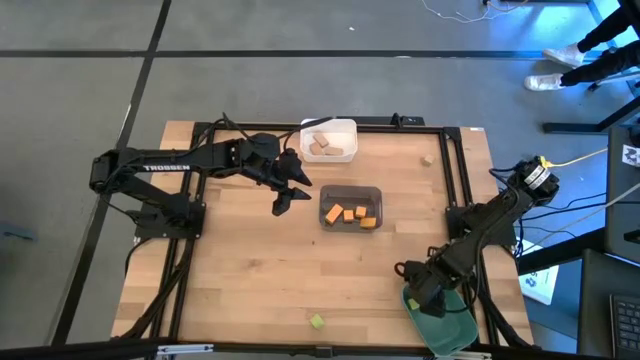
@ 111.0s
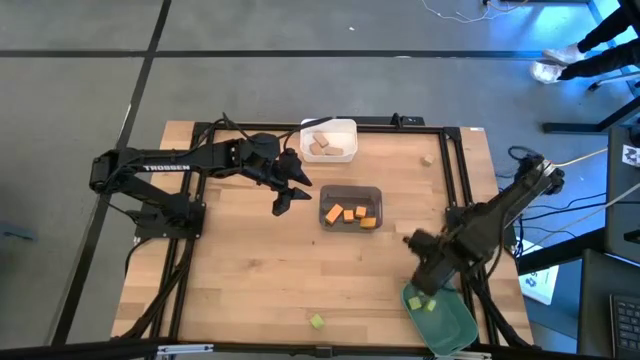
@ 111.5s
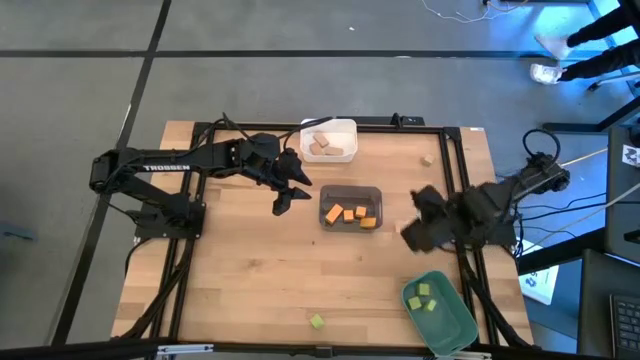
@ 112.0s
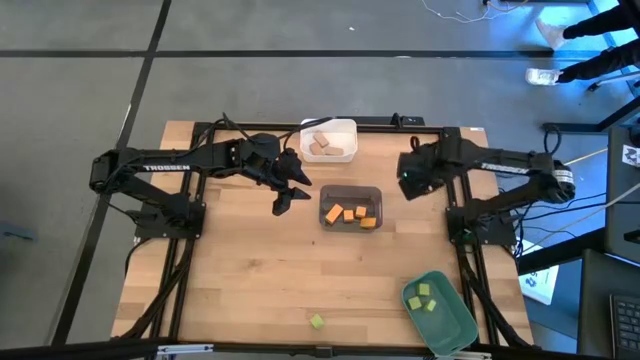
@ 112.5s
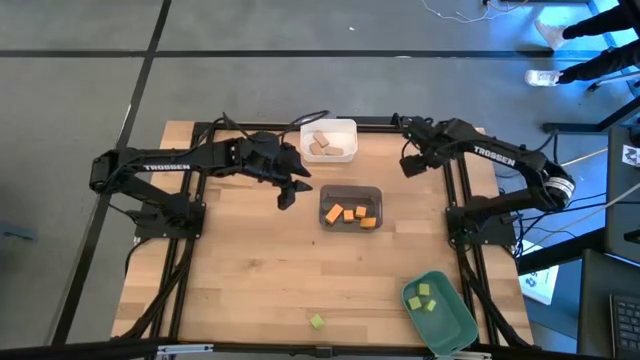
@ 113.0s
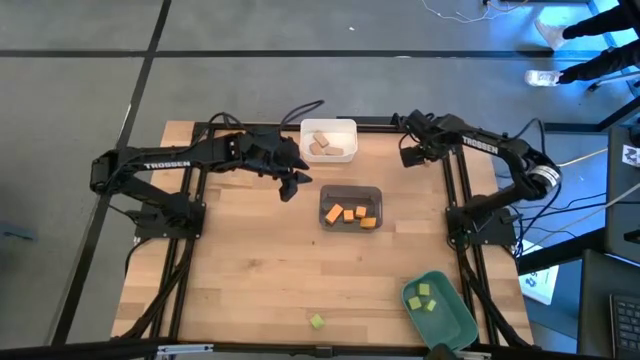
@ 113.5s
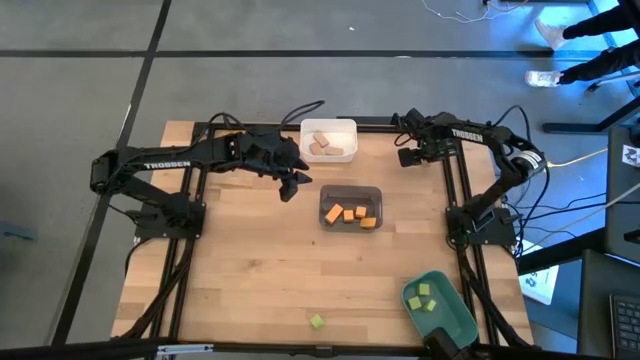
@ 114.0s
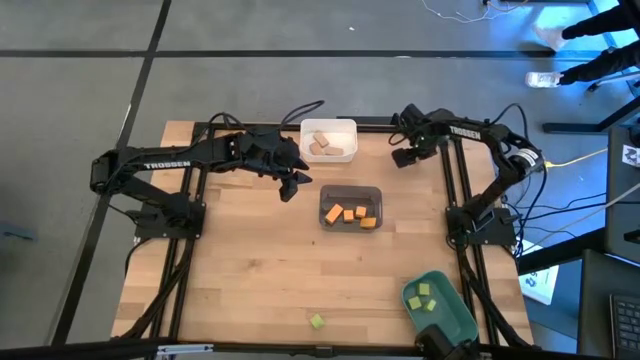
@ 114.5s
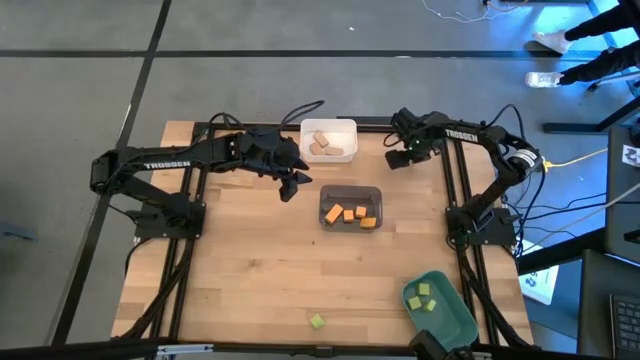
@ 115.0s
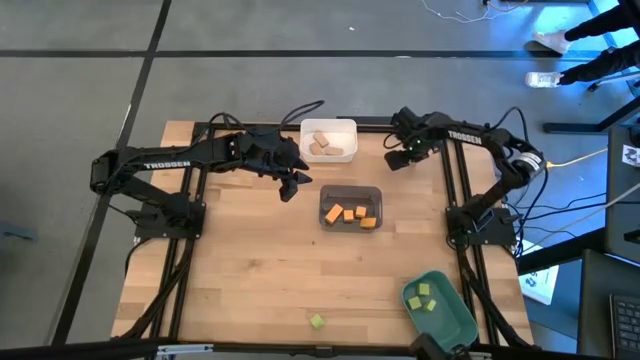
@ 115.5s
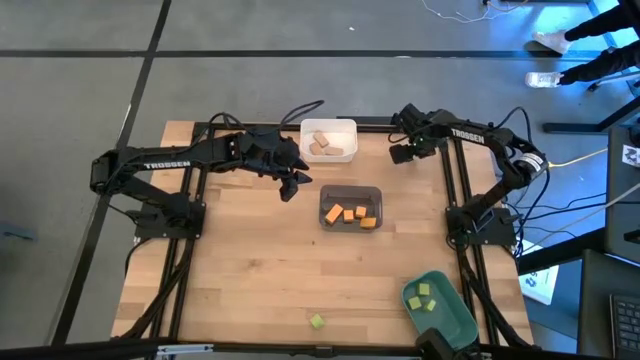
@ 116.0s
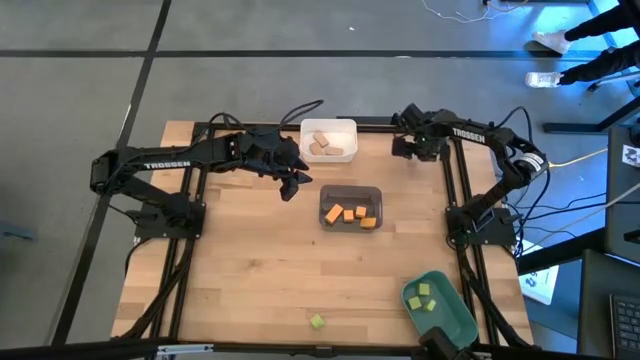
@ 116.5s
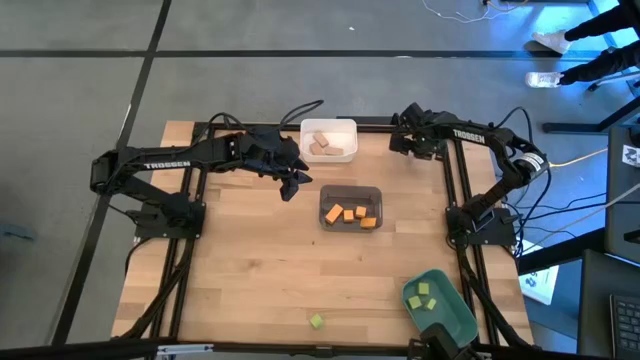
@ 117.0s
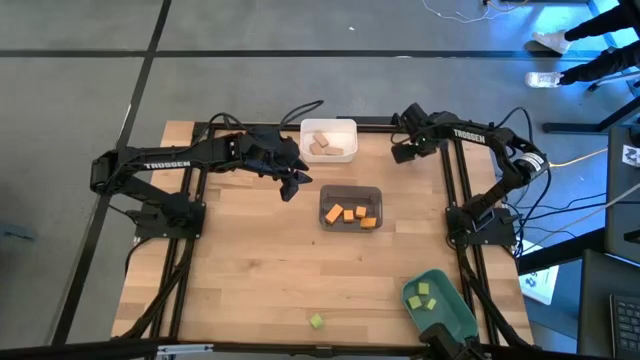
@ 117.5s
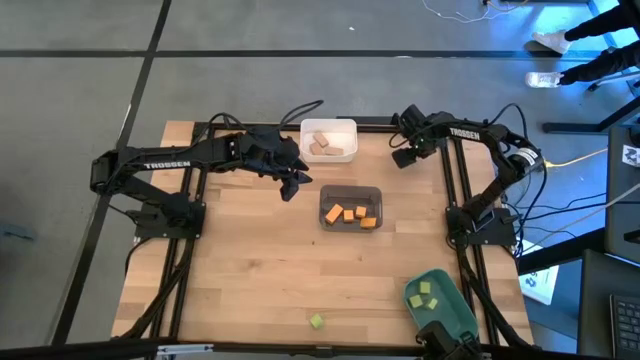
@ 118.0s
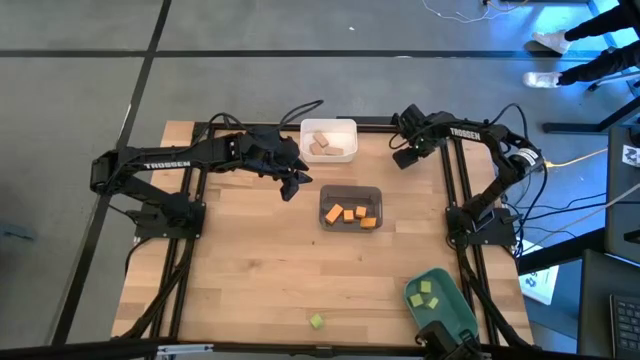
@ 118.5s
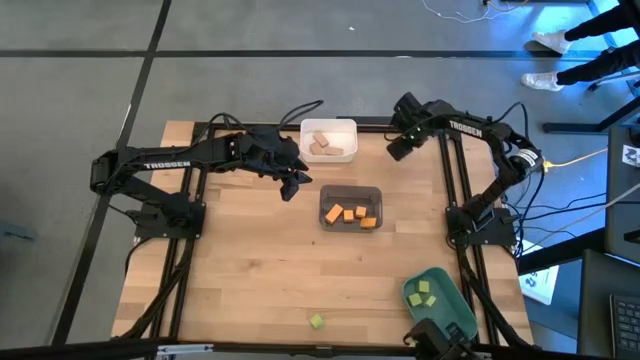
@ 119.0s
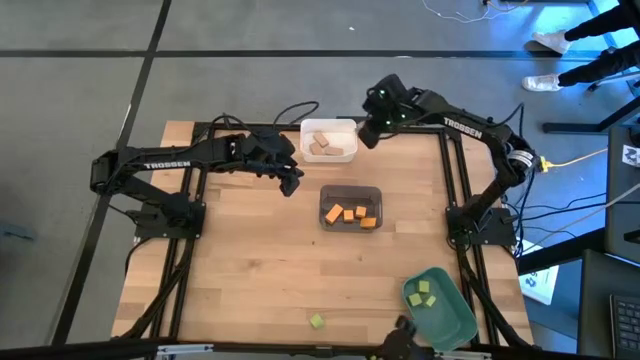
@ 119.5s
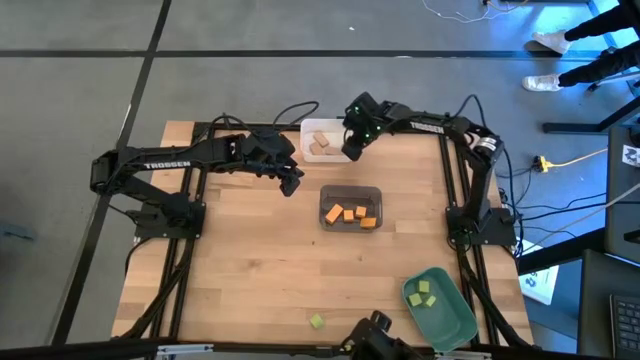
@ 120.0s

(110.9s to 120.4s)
Task: Sort & place blocks by color
Put the brown block into the white bin

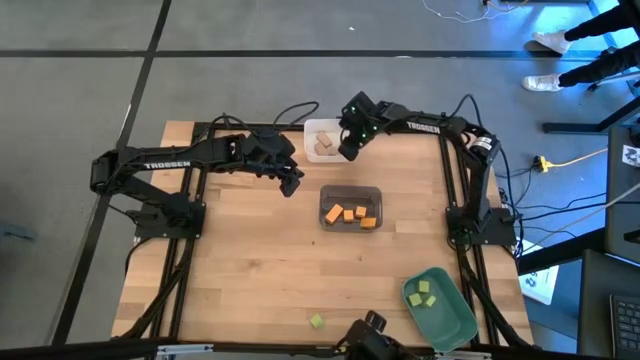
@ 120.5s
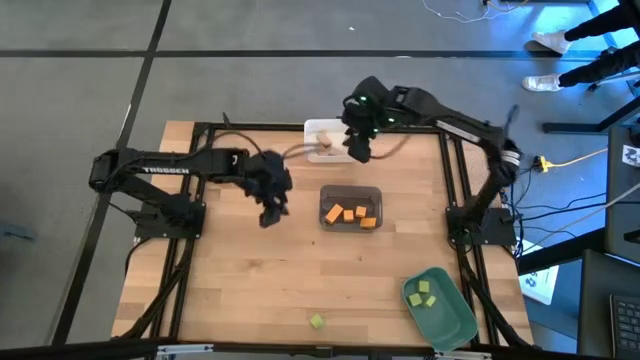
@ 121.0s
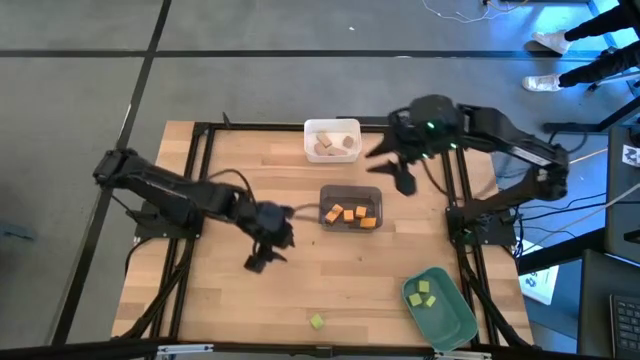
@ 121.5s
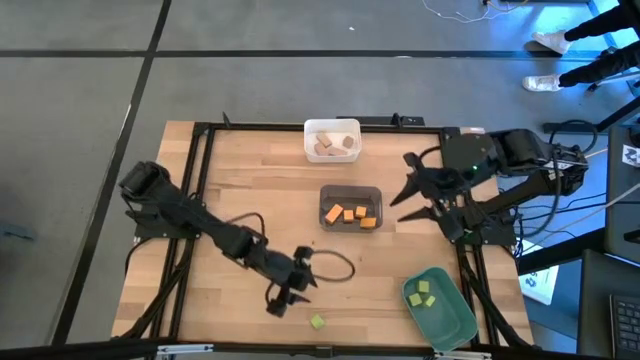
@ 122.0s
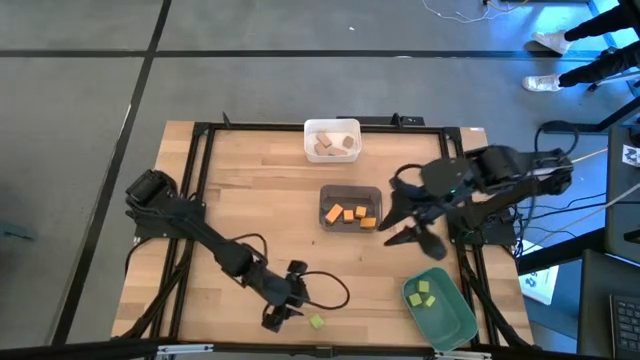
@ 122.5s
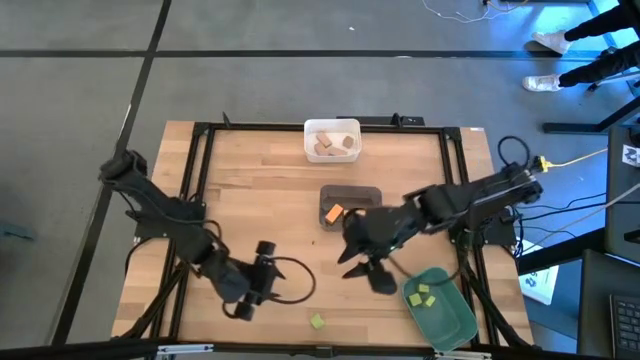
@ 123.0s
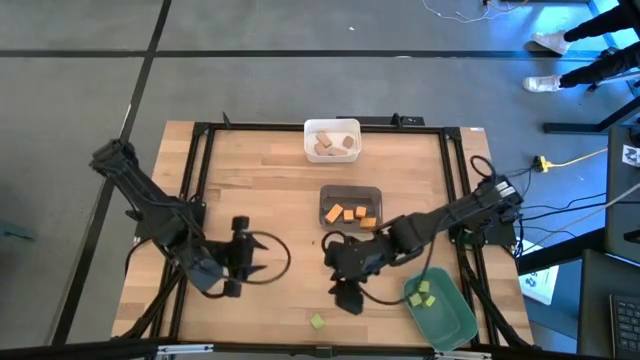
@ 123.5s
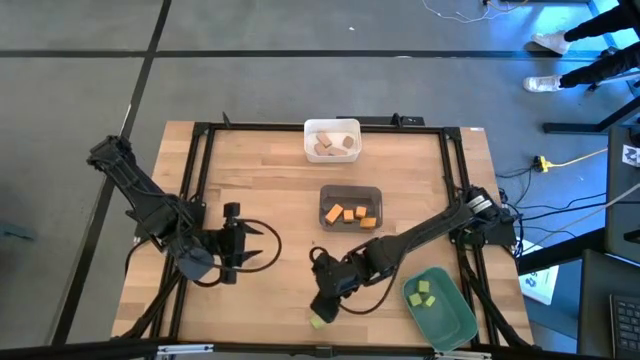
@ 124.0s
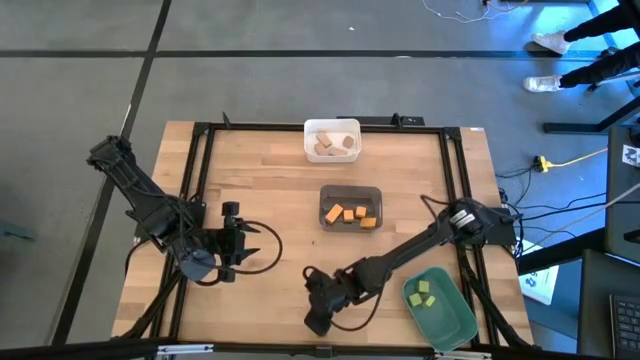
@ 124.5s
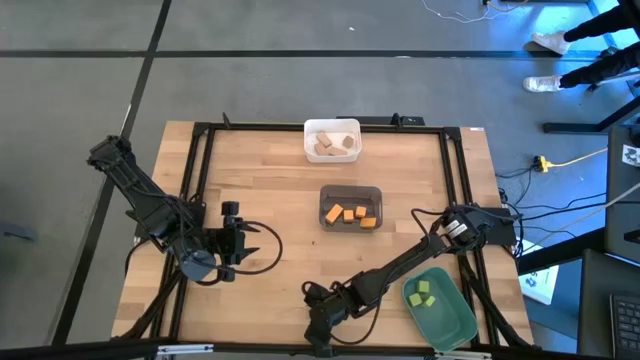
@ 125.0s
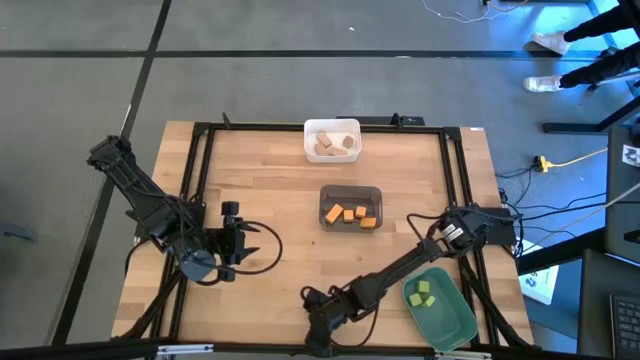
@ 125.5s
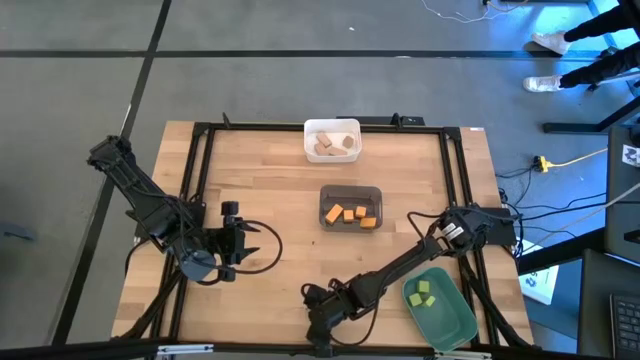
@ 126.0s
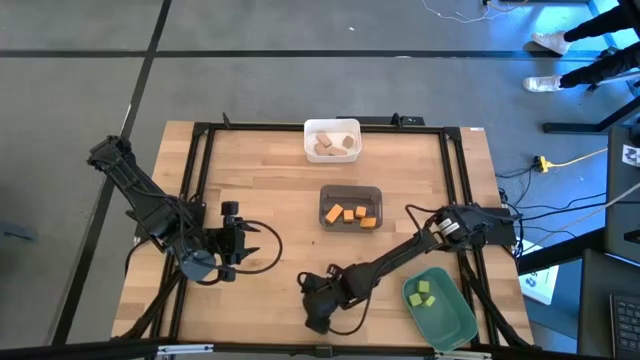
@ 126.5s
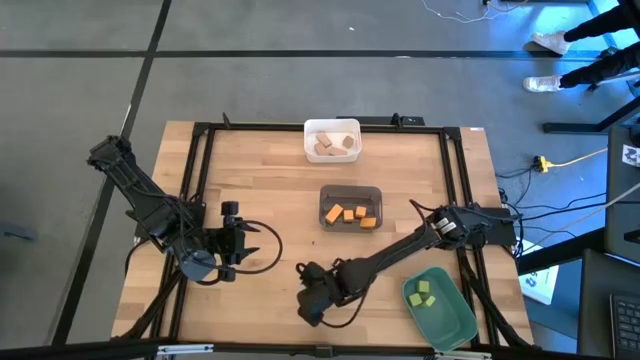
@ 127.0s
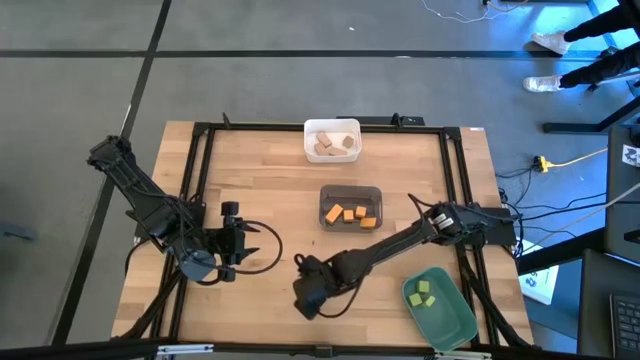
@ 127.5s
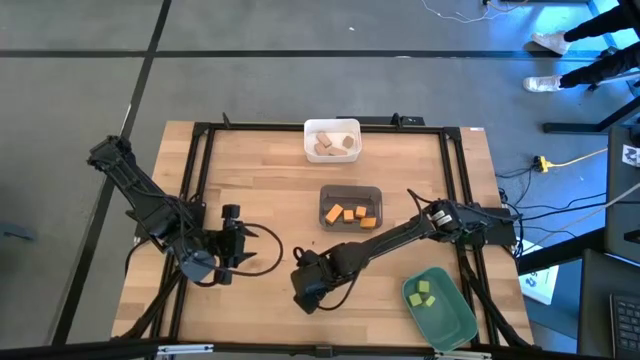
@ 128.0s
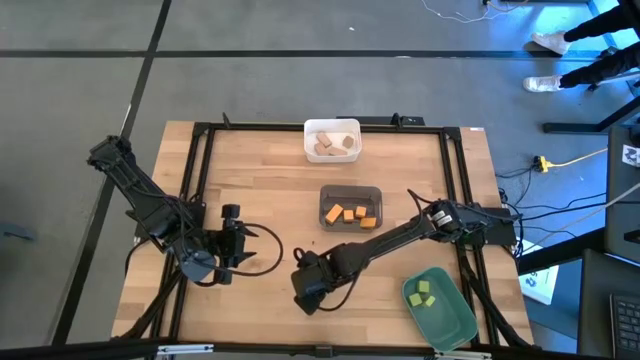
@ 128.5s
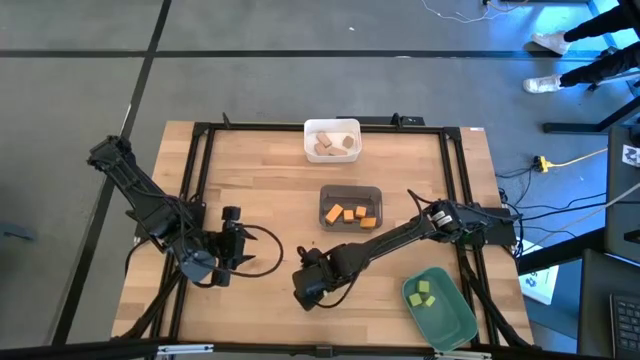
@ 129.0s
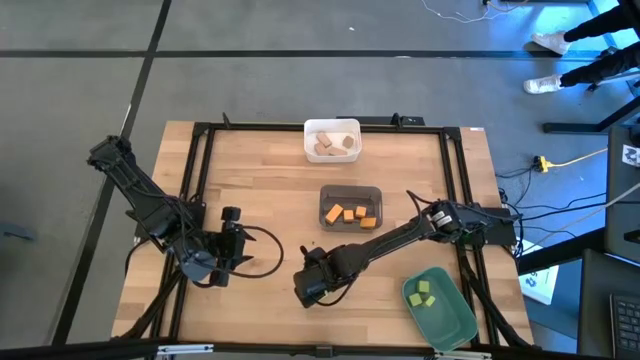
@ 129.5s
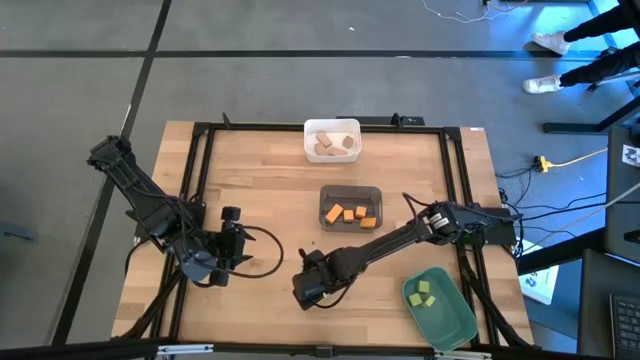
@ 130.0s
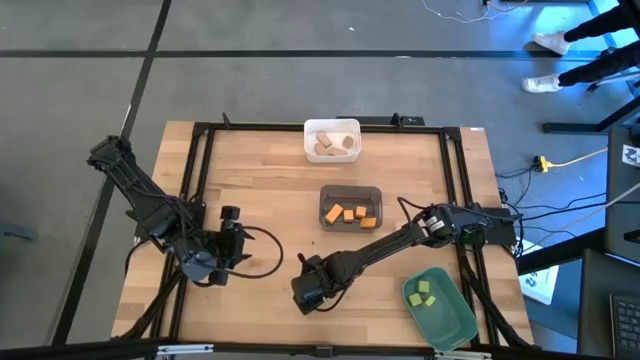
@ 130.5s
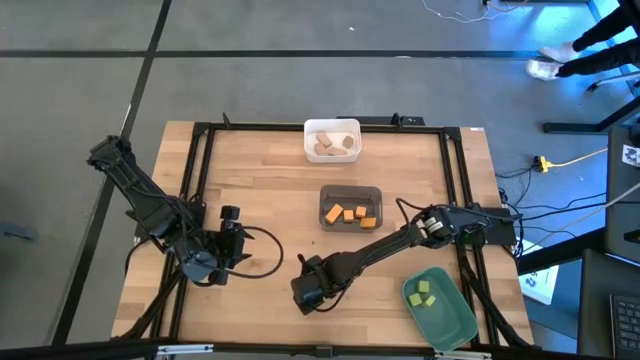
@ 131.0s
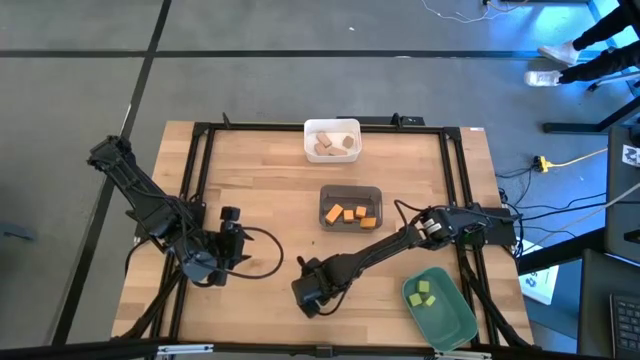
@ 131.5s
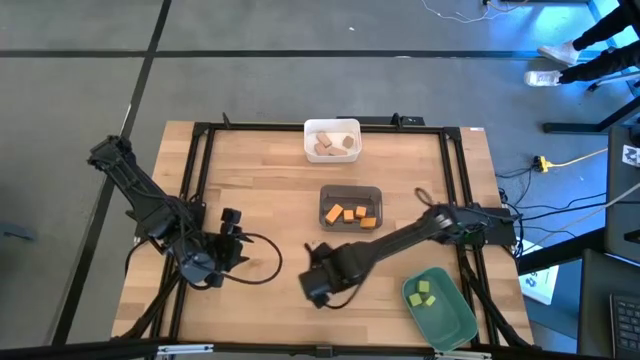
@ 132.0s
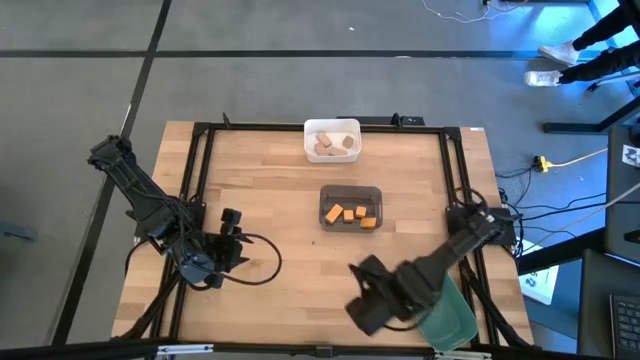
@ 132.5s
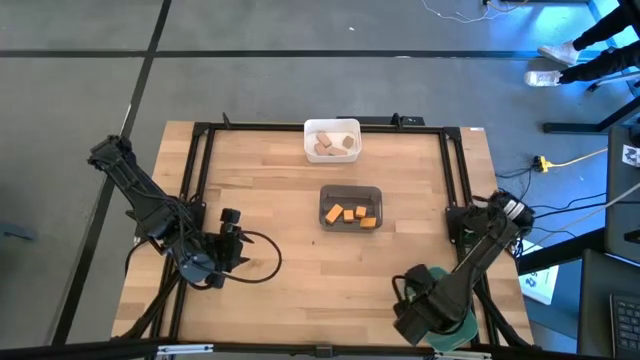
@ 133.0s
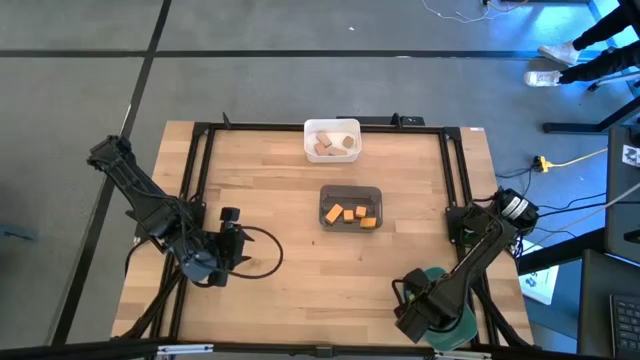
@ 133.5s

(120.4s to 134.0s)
Put the green block into the green bin
